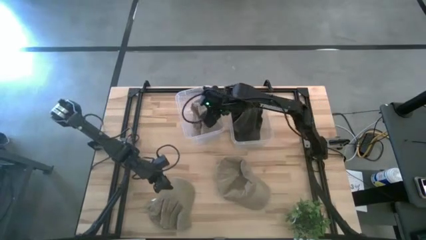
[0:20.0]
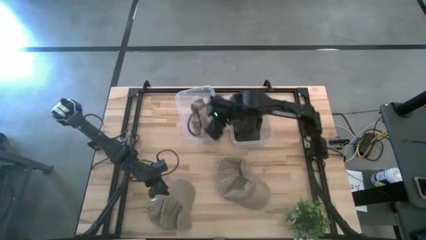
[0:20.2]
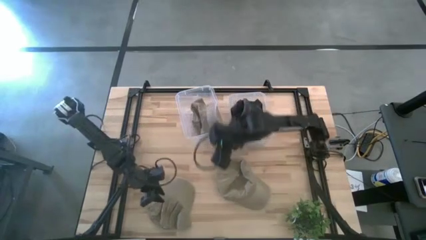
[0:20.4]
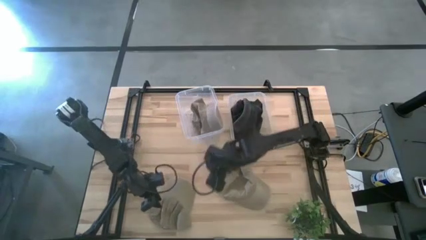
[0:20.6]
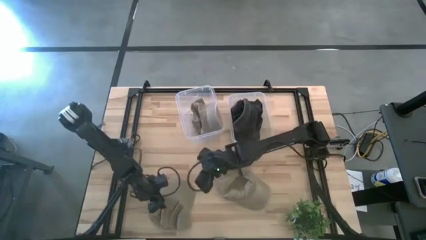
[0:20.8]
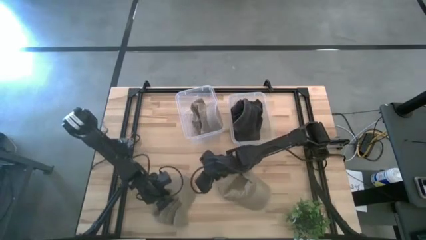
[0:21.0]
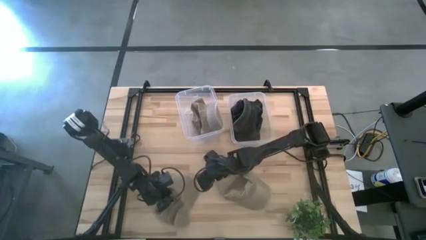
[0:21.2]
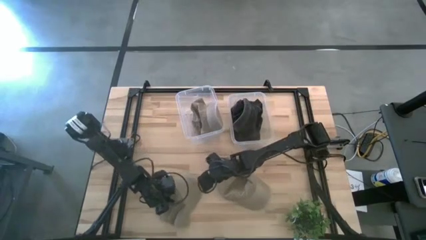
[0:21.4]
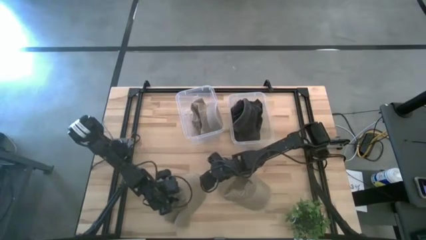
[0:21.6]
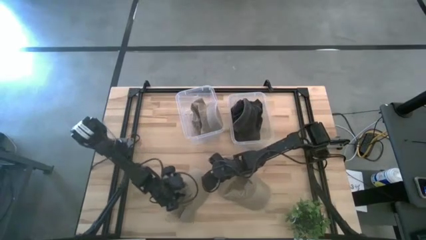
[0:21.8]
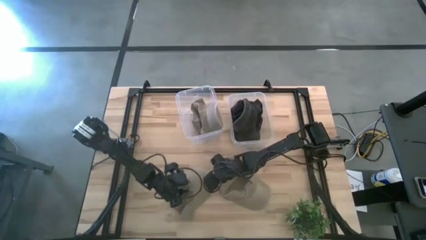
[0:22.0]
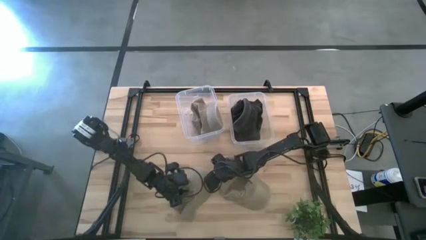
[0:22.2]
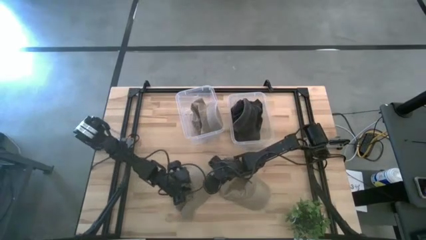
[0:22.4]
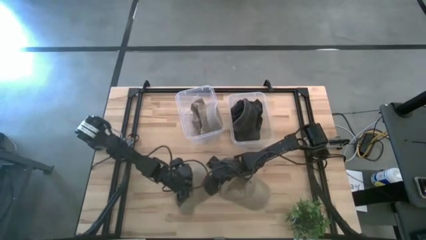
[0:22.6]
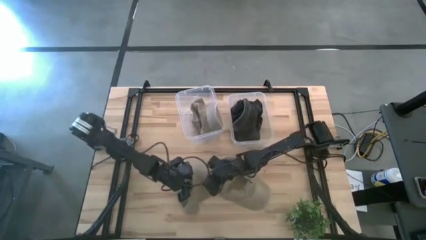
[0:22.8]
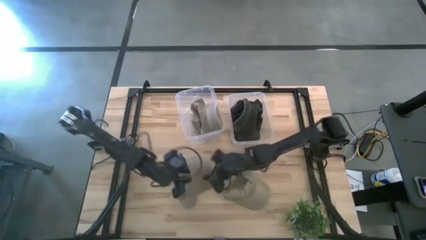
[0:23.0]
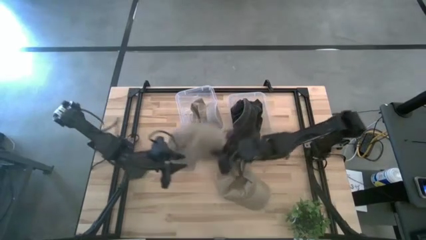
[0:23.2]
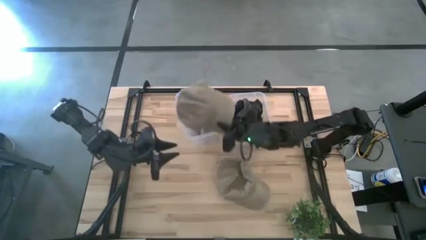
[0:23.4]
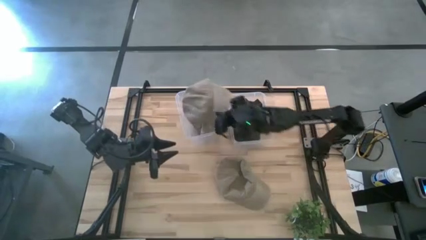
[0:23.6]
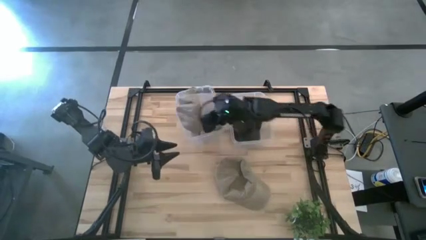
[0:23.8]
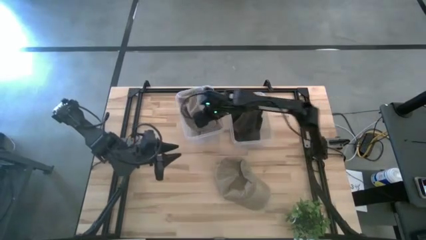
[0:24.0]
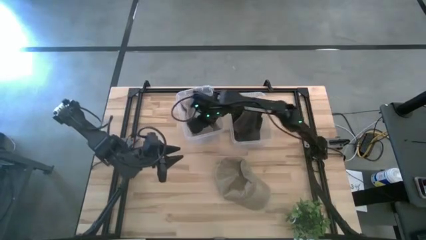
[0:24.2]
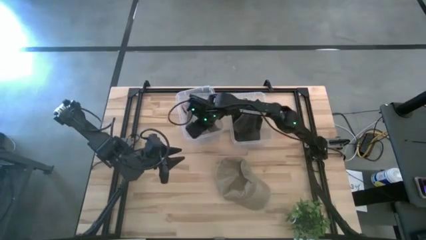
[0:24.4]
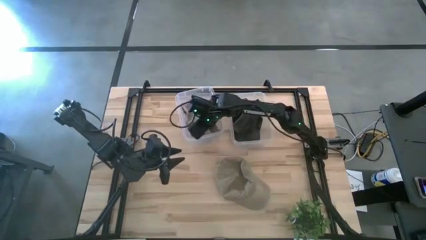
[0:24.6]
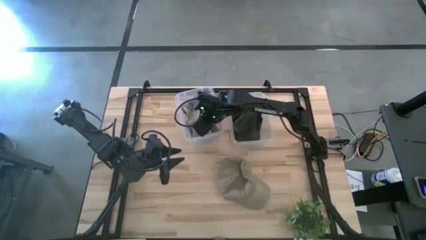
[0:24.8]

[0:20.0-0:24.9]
Task: Pick & Place hat
Put the left brown cap into the left transparent bin

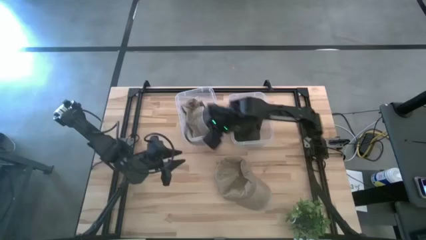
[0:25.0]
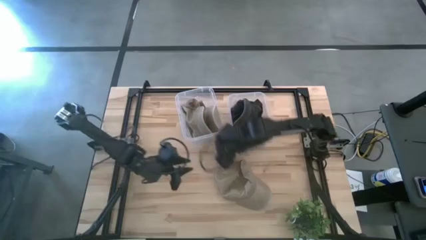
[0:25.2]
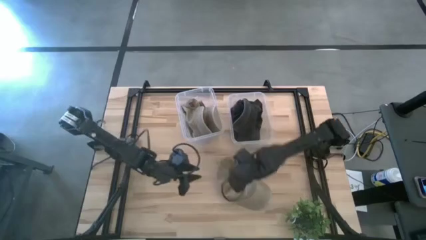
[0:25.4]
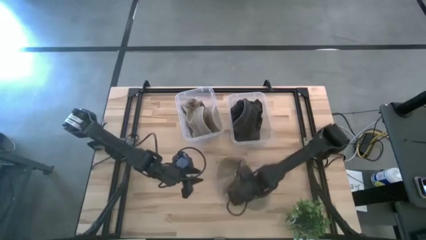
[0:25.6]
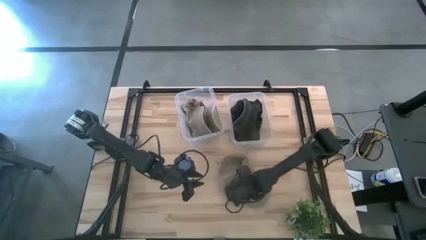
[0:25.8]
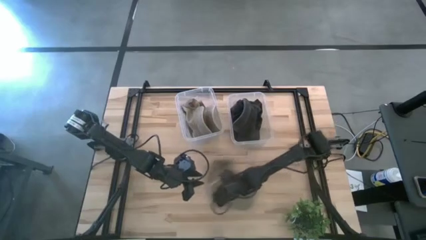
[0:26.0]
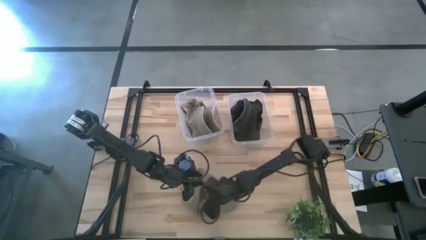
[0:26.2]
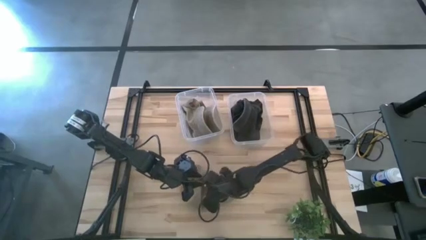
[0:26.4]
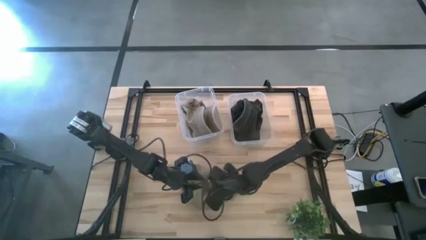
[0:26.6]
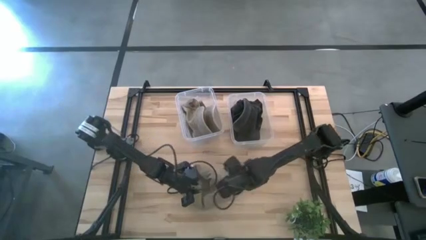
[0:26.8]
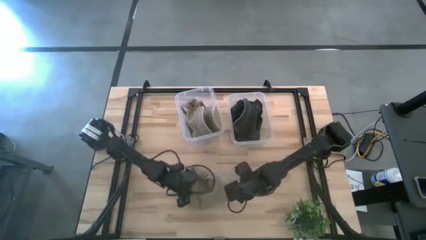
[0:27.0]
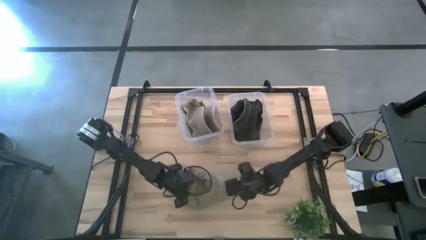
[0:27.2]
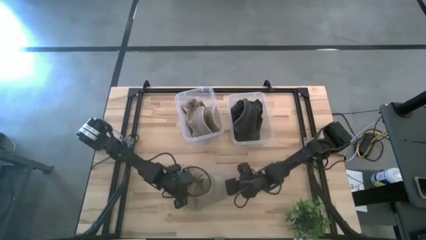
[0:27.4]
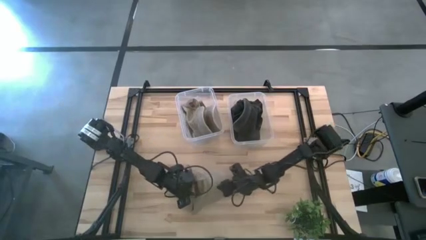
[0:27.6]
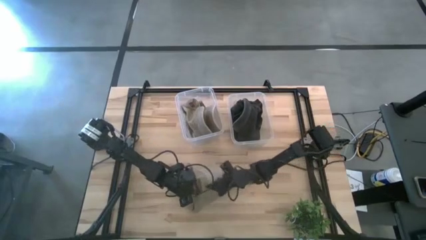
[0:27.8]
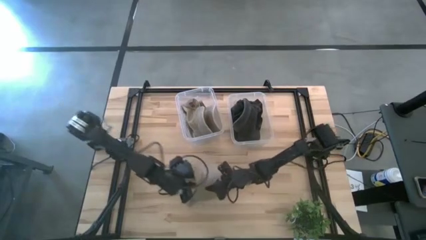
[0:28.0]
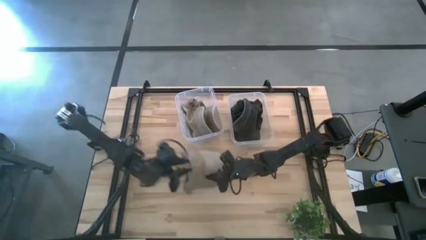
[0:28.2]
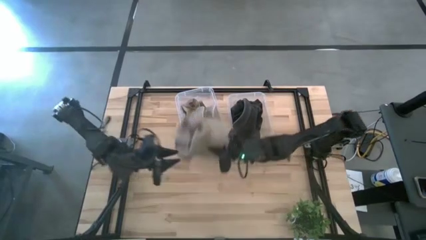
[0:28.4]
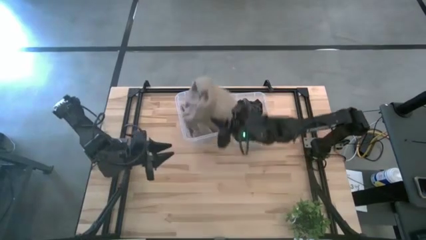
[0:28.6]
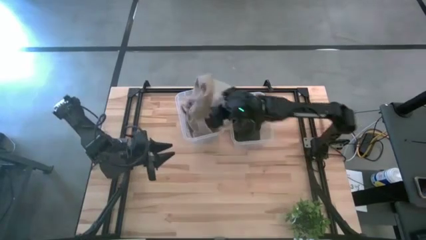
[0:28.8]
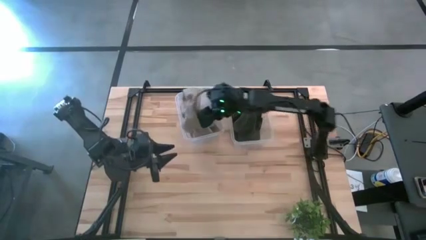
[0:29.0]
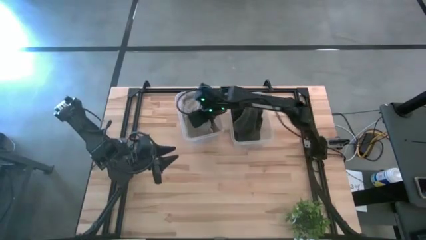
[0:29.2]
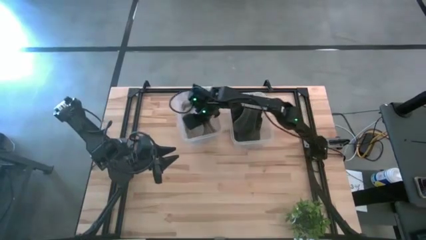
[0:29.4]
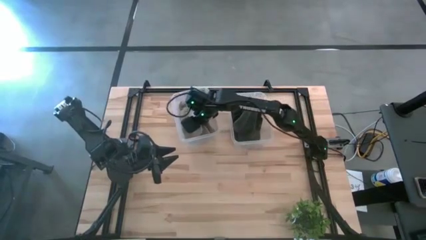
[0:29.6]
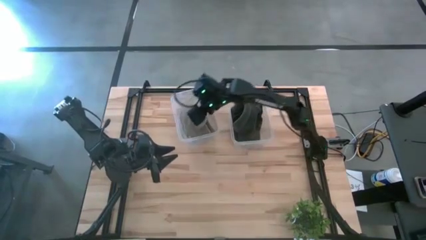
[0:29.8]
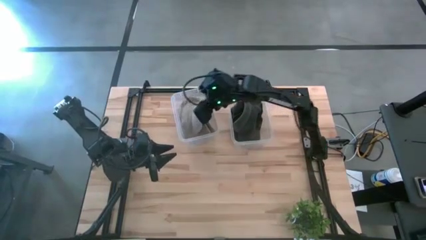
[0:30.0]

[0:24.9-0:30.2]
Put the brown cap into the left transparent bin

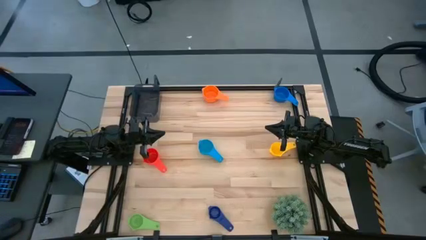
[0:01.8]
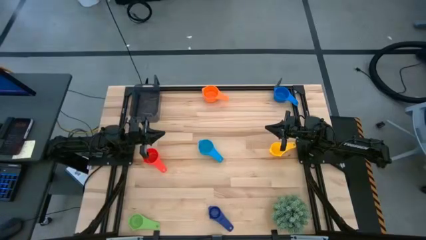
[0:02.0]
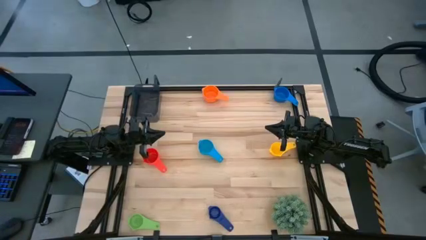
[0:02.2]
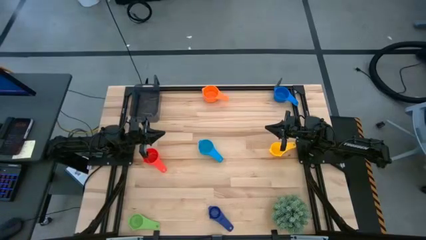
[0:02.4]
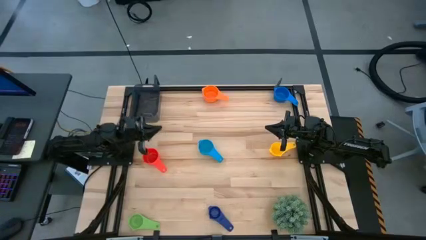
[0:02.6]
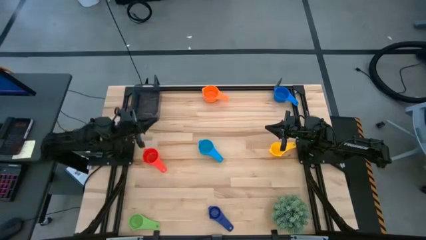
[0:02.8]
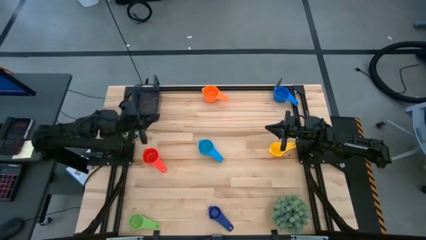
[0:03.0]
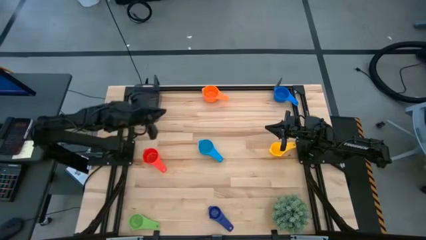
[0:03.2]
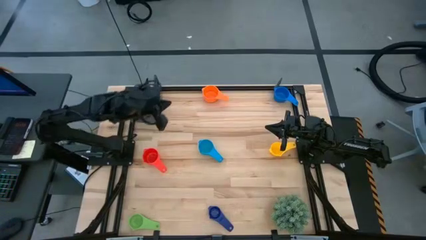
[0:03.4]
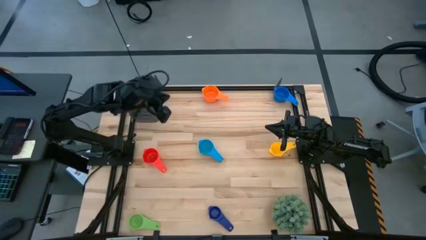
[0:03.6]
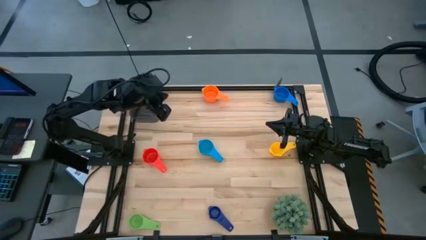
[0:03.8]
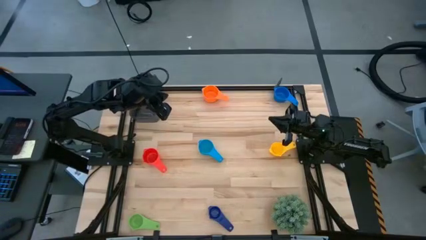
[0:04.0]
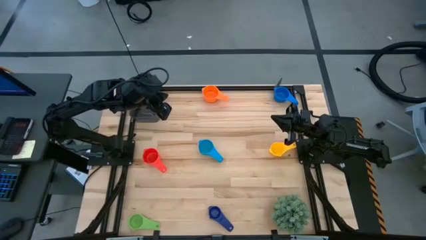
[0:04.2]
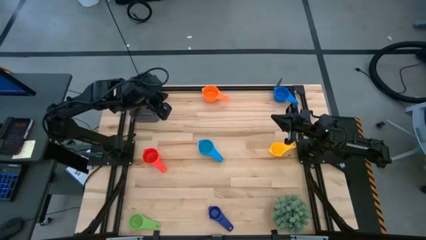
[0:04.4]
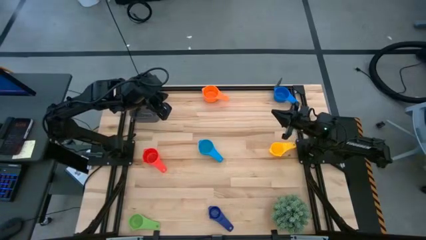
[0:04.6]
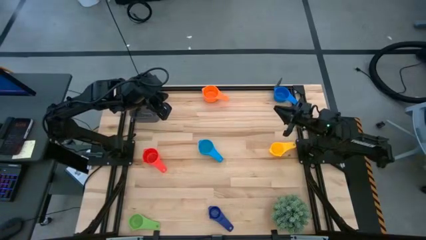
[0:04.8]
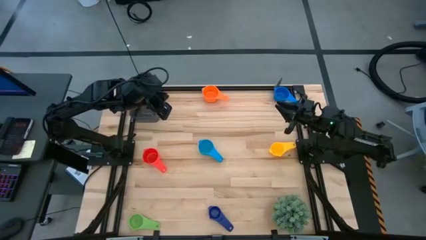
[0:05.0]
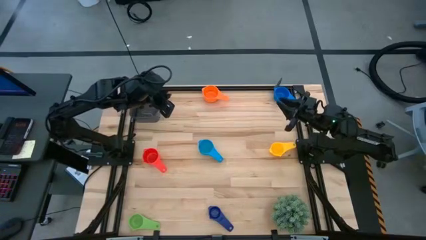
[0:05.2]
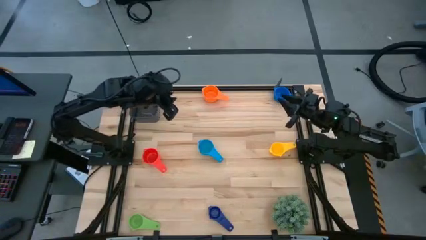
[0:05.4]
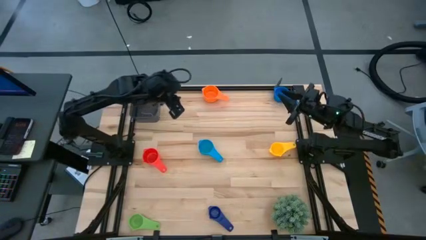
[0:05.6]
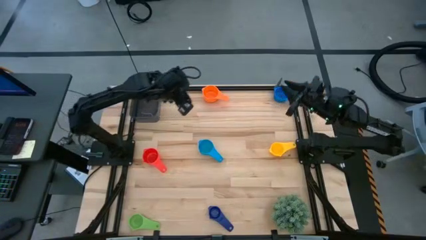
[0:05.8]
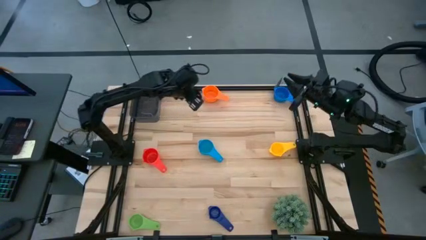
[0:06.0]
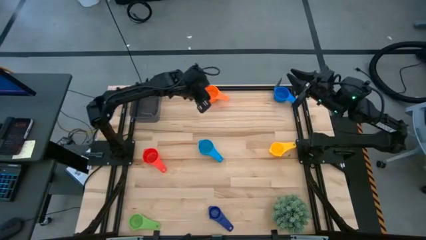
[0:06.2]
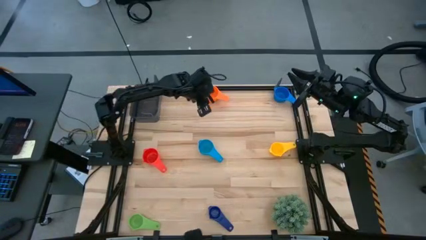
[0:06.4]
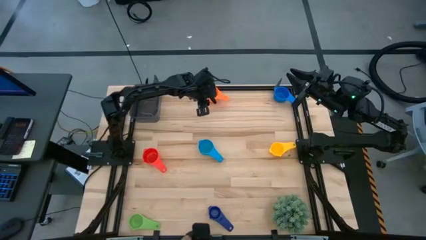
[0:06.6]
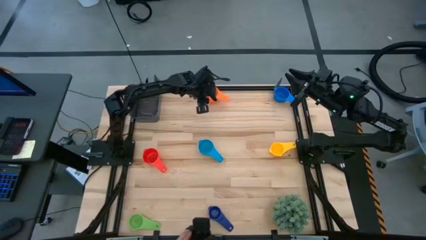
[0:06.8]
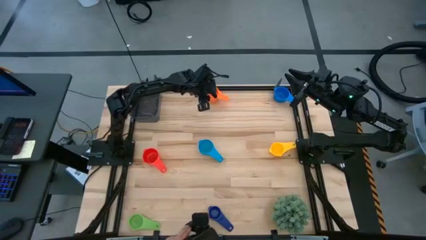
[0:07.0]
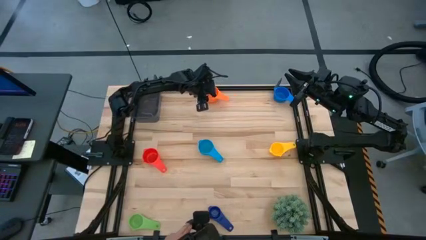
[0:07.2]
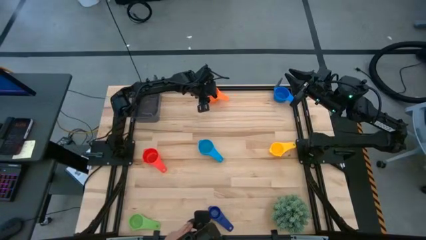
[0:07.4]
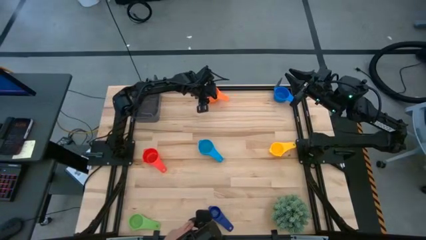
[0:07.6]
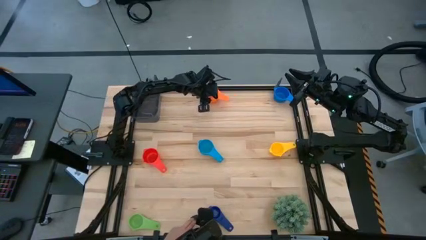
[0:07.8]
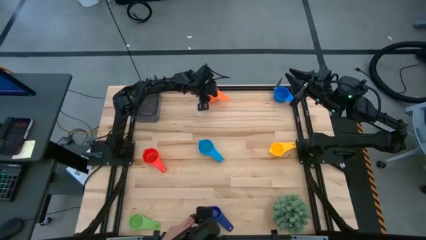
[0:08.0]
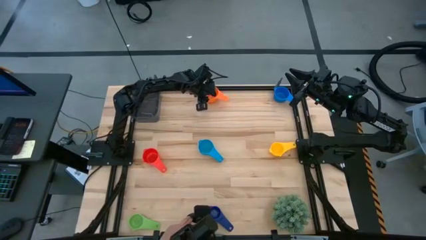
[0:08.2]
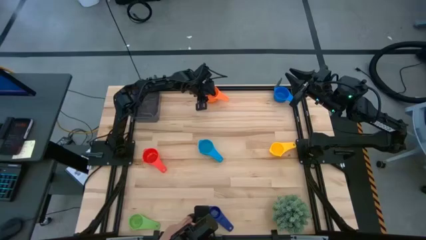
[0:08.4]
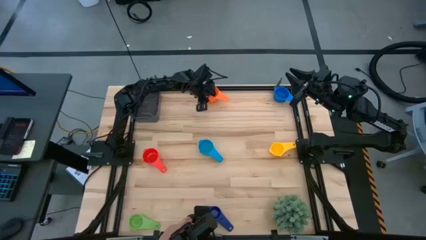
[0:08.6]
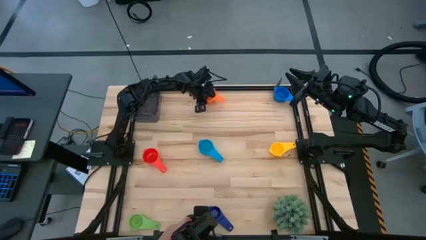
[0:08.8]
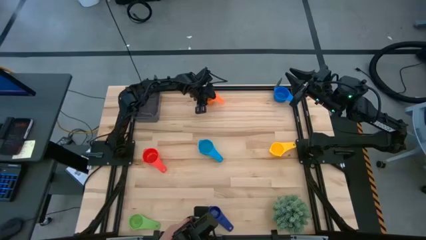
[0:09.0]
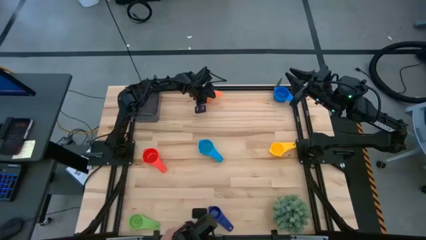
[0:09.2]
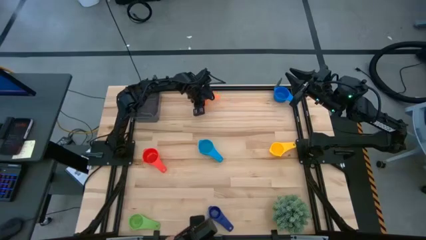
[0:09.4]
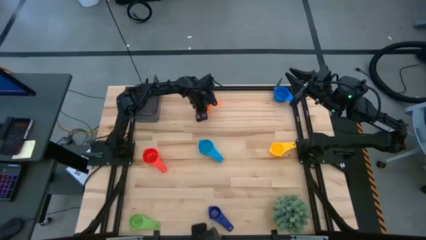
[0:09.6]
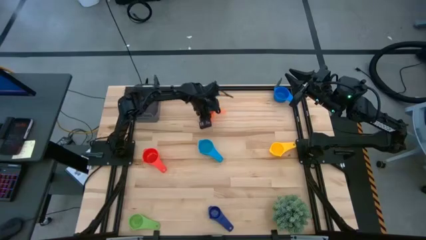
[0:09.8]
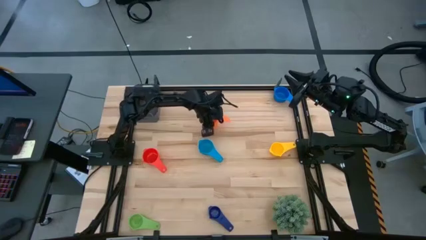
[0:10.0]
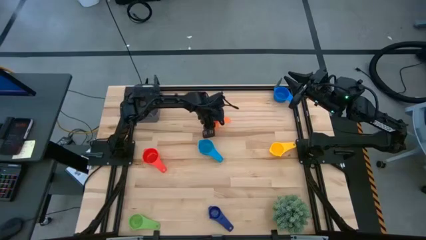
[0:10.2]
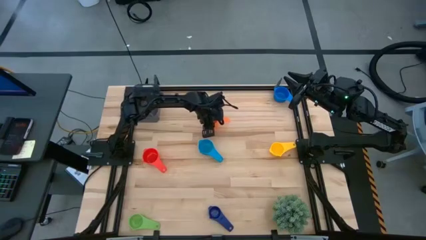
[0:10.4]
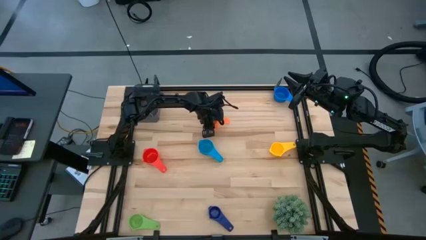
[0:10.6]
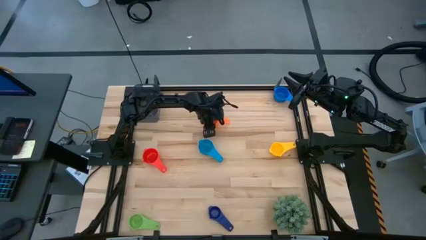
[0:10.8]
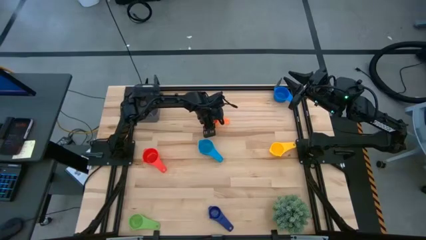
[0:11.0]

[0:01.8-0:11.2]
Task: Nest measuring cups in basket
Move the orange measuring cup to the center of the table
